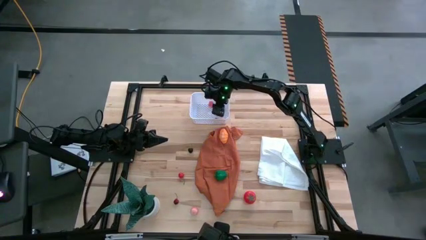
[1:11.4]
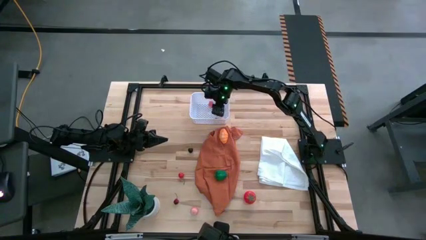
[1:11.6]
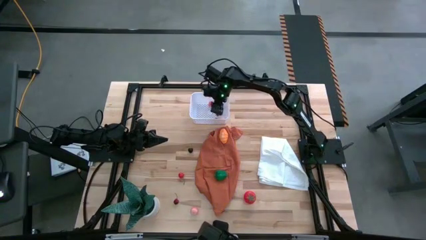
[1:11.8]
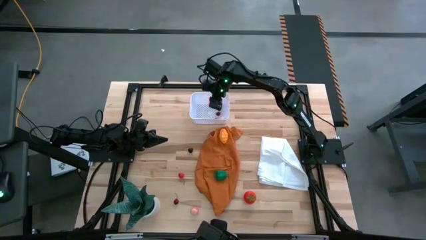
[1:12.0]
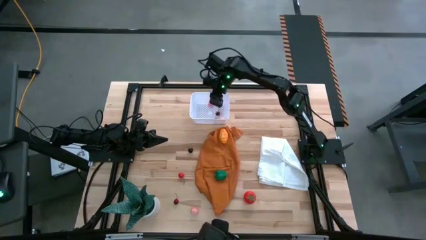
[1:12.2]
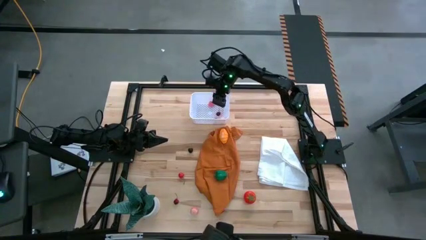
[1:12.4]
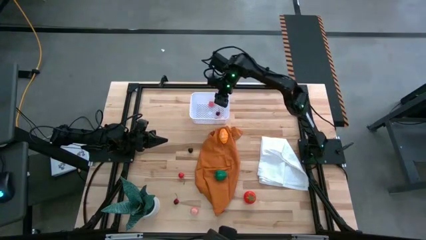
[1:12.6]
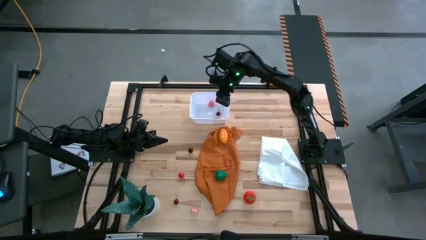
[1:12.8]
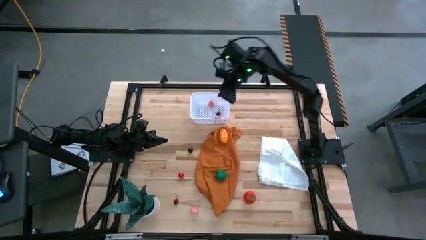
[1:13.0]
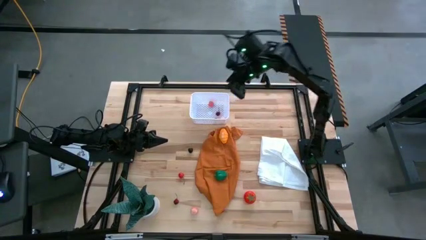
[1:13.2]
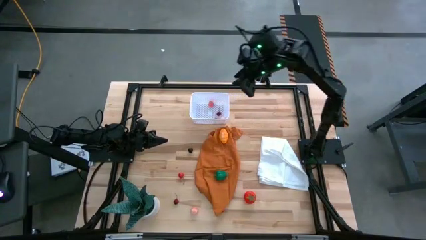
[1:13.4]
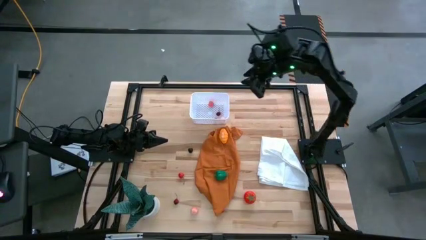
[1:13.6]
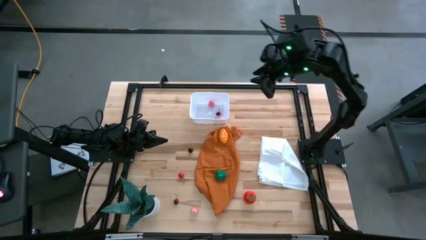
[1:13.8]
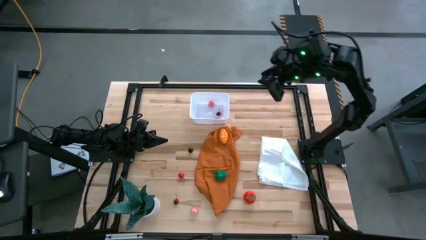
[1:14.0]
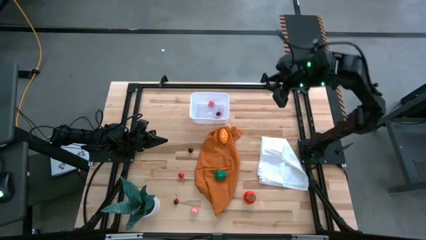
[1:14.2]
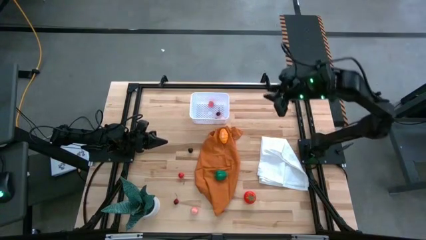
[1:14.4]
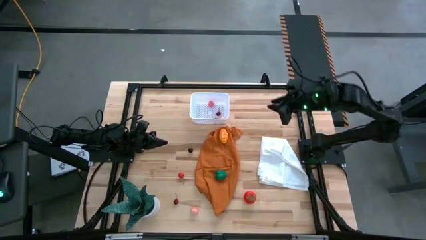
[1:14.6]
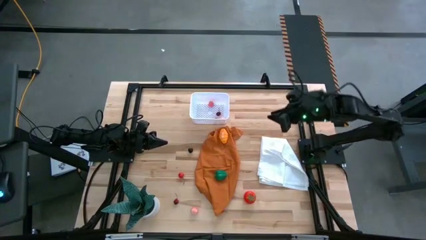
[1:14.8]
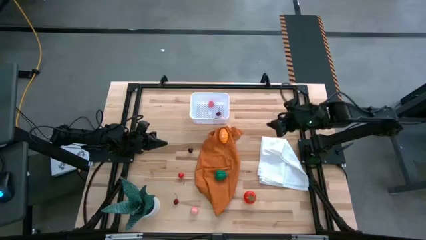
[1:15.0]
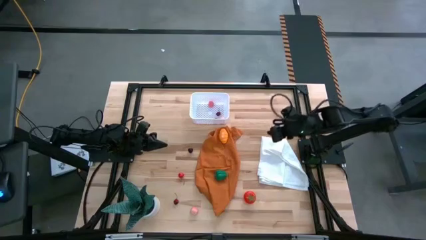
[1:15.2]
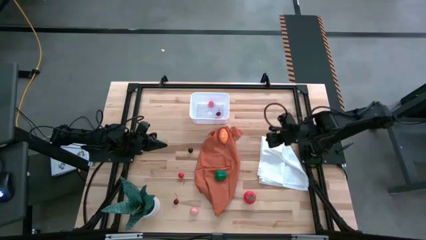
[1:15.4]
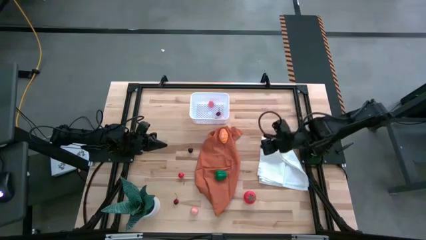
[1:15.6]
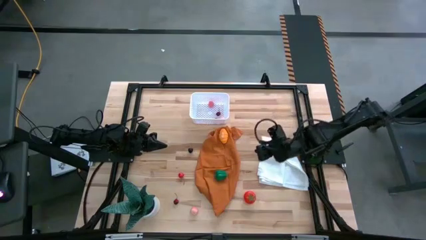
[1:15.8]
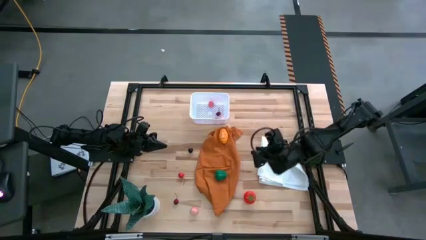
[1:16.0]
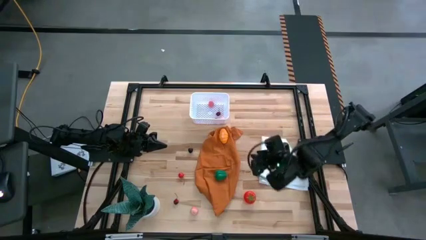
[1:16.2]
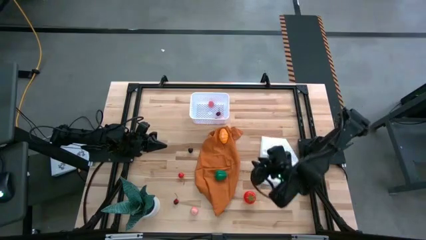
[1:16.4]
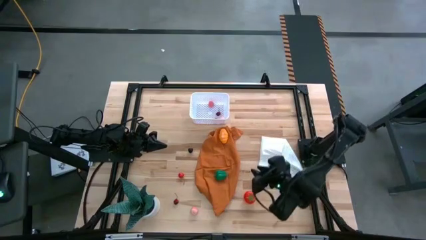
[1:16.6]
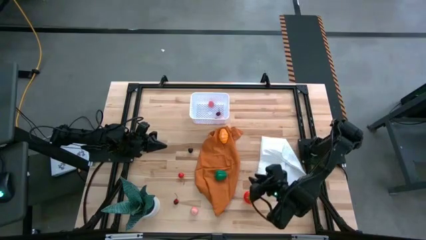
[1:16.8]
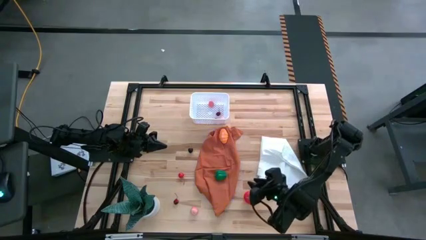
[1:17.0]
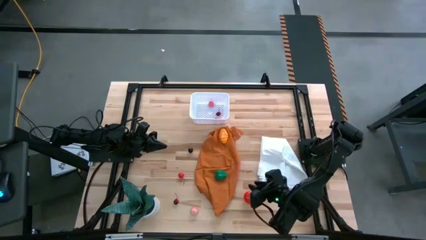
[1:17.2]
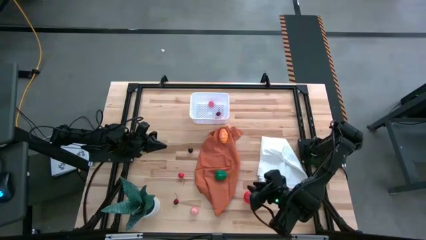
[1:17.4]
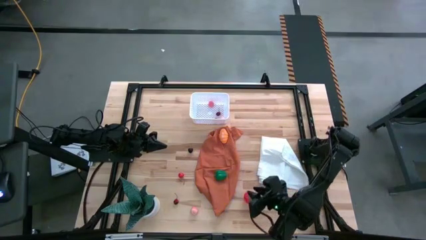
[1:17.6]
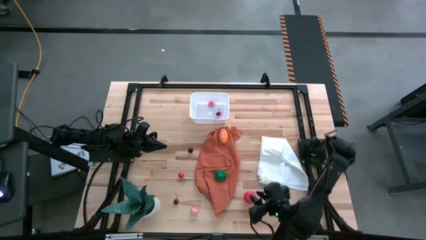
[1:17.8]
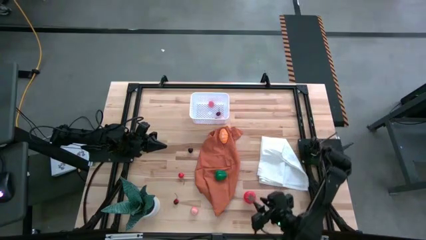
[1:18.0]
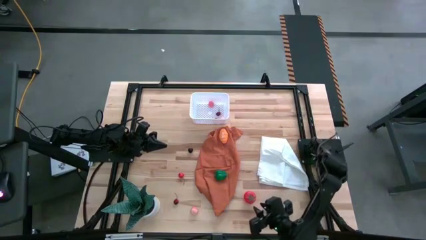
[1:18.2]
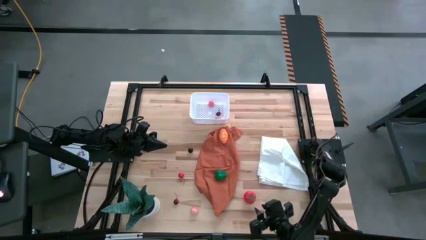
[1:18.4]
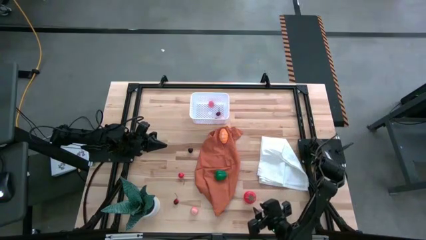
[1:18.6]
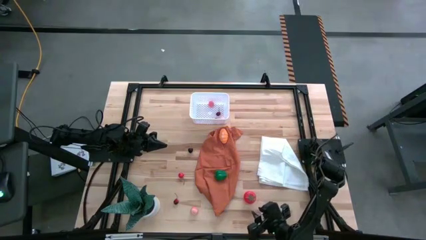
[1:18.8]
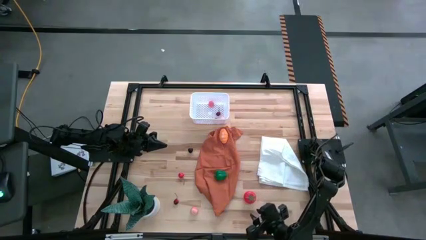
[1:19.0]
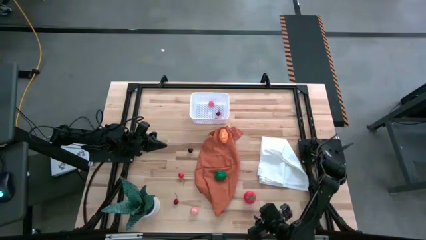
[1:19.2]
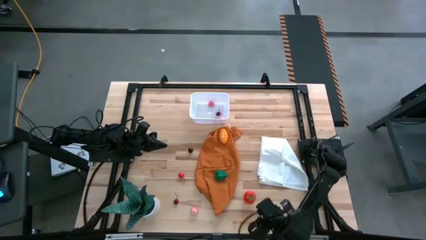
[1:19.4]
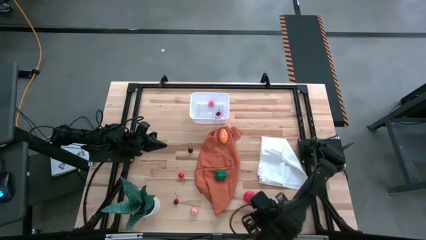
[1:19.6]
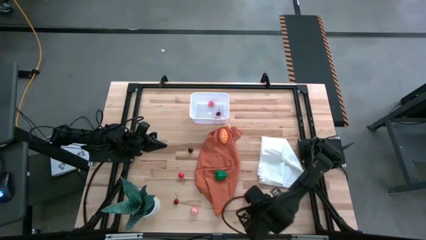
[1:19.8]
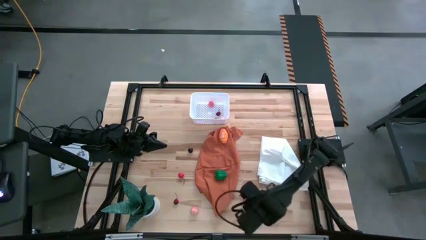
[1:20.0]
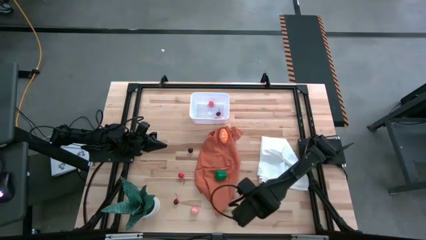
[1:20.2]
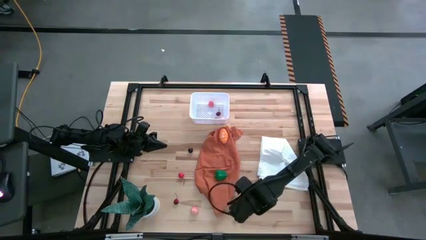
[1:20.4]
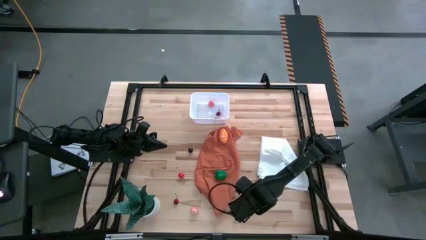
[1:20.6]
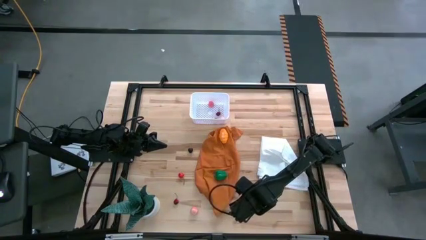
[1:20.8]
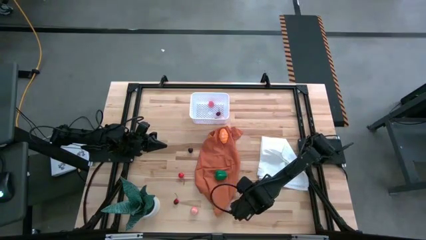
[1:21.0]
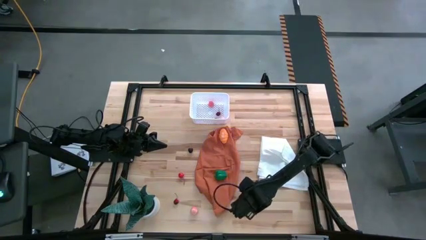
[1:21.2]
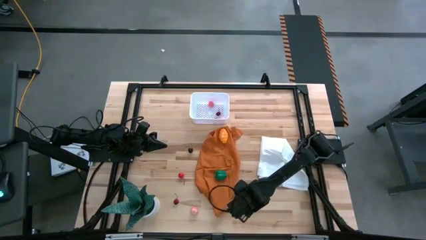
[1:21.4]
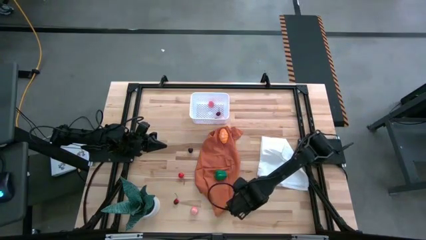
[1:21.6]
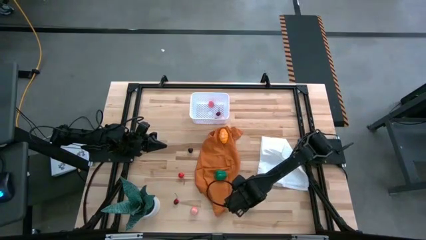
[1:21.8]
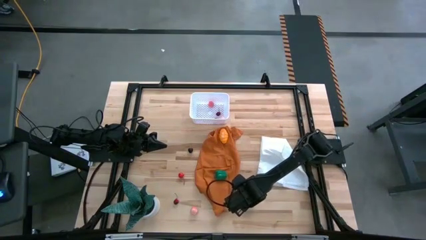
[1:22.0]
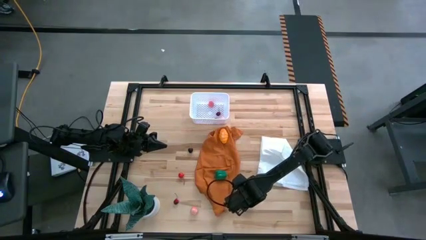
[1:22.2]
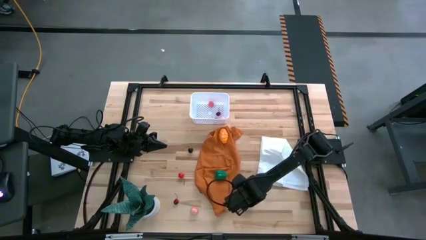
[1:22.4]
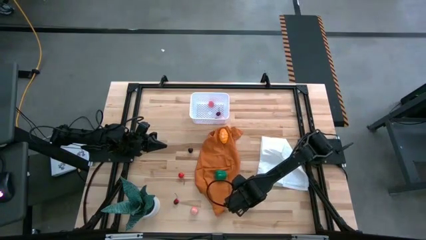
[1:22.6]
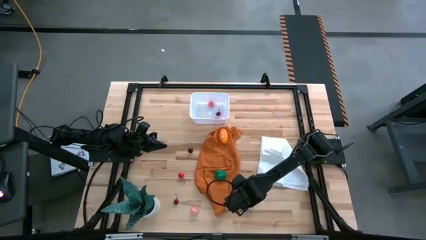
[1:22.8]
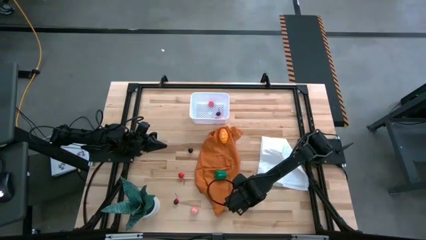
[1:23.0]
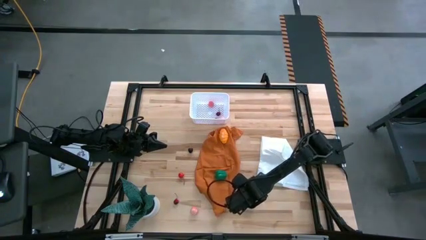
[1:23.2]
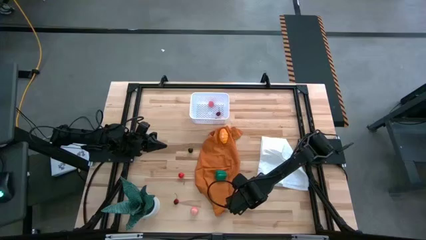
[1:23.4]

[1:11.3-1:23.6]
Task: Pick and placing Produce into tupperware
Put the red tomato into the white basket
